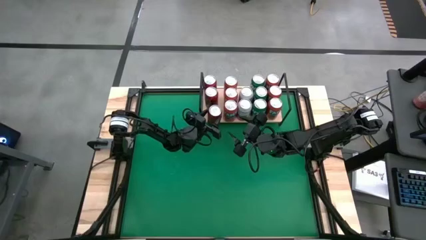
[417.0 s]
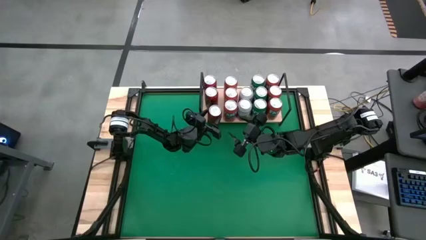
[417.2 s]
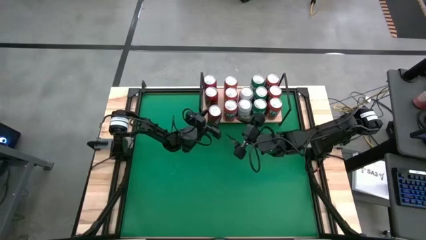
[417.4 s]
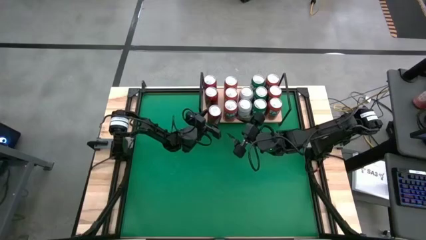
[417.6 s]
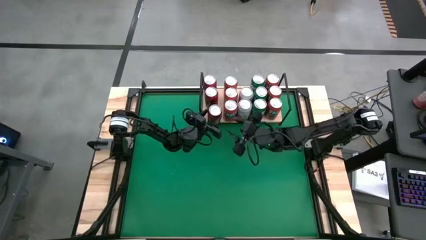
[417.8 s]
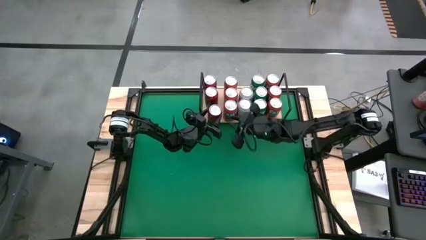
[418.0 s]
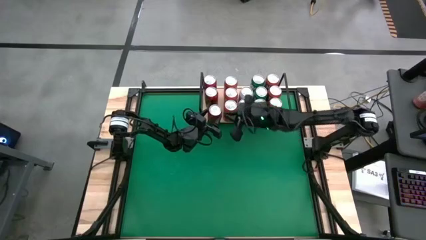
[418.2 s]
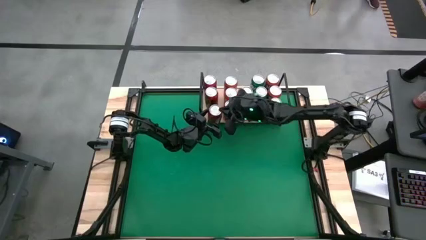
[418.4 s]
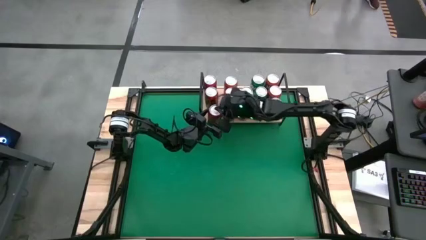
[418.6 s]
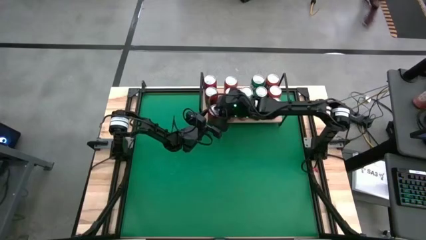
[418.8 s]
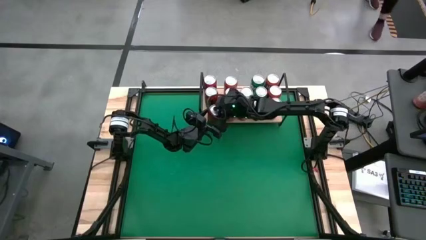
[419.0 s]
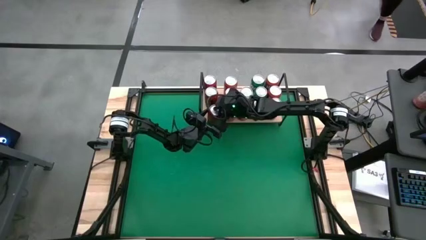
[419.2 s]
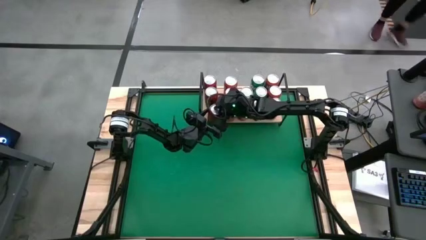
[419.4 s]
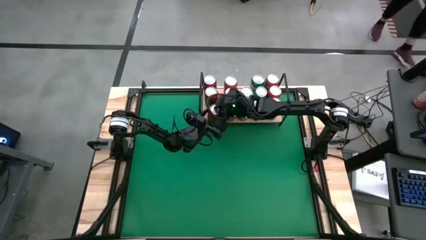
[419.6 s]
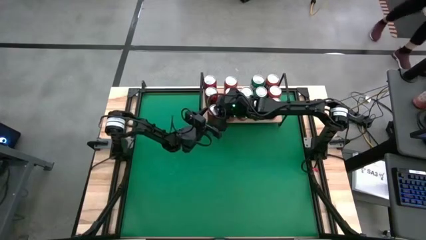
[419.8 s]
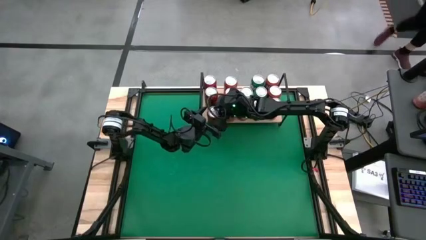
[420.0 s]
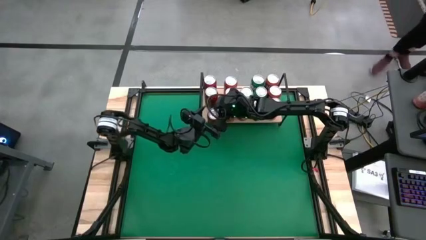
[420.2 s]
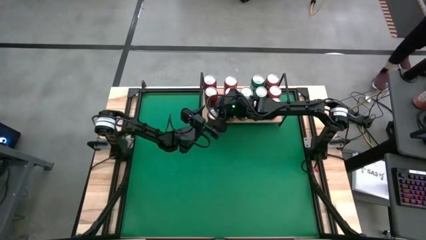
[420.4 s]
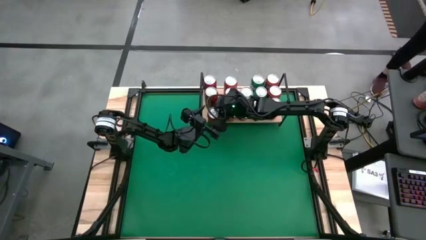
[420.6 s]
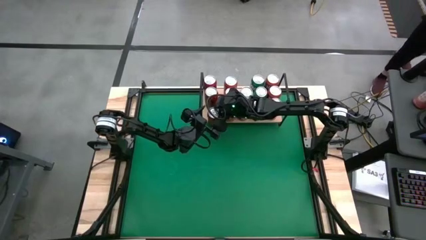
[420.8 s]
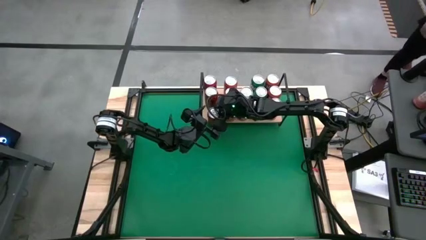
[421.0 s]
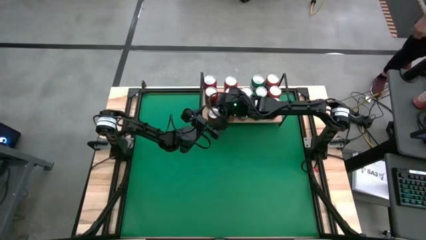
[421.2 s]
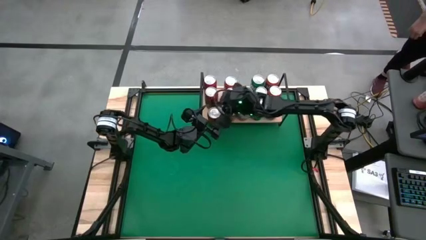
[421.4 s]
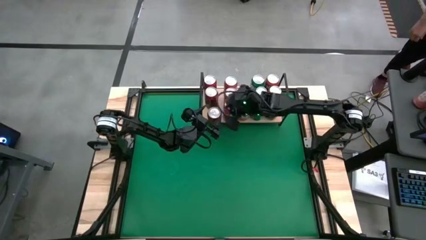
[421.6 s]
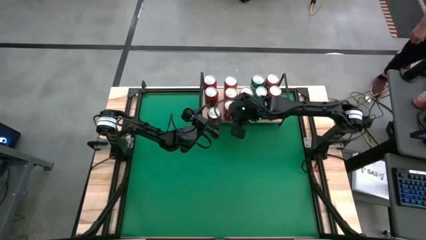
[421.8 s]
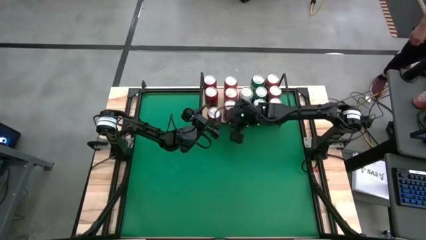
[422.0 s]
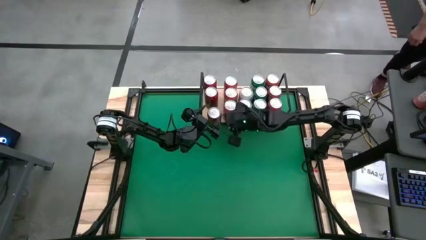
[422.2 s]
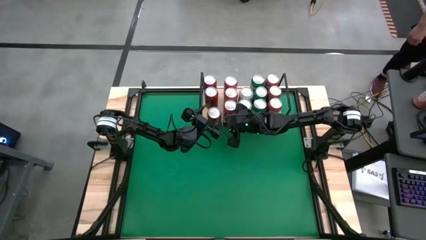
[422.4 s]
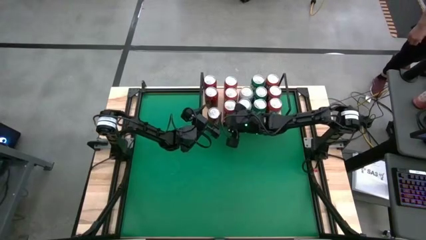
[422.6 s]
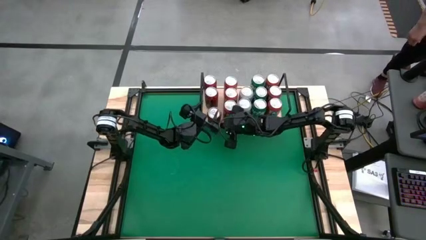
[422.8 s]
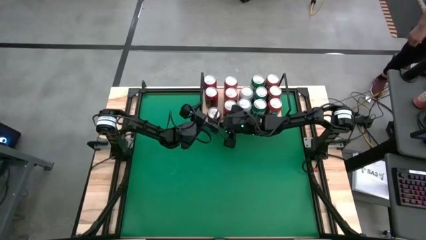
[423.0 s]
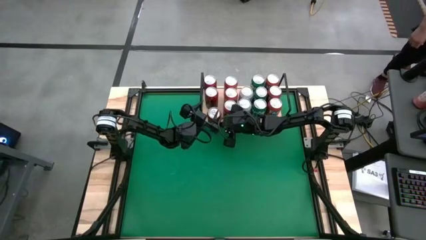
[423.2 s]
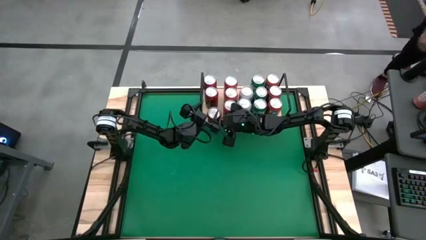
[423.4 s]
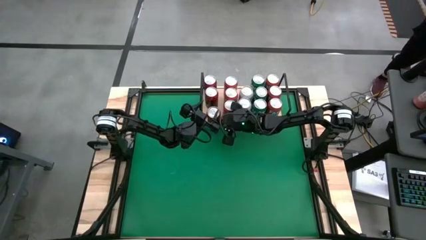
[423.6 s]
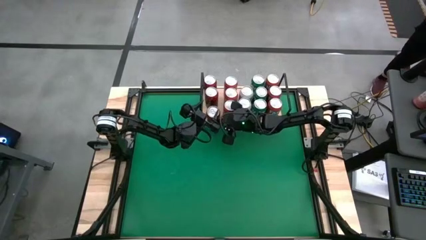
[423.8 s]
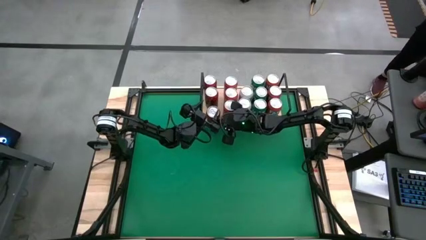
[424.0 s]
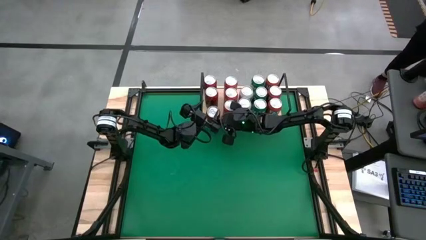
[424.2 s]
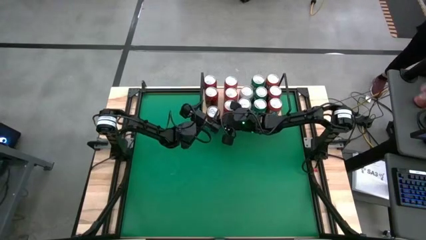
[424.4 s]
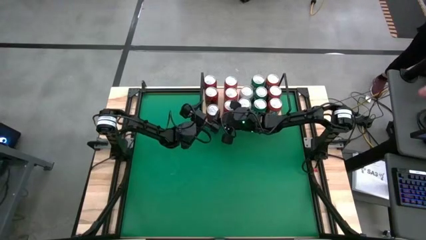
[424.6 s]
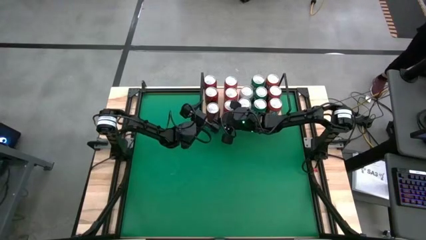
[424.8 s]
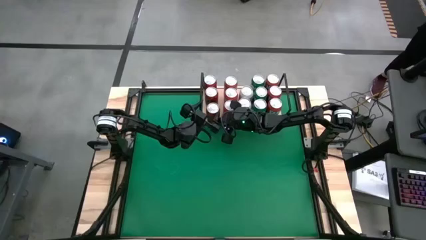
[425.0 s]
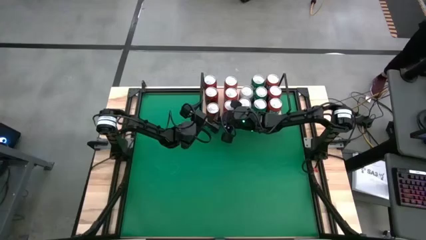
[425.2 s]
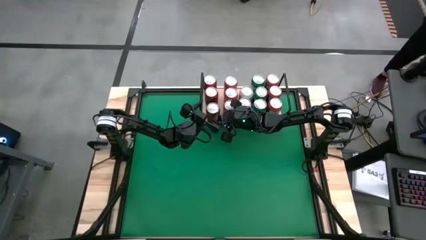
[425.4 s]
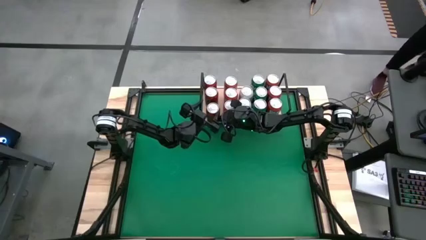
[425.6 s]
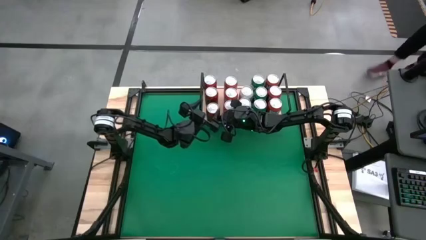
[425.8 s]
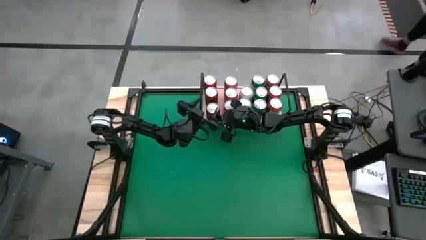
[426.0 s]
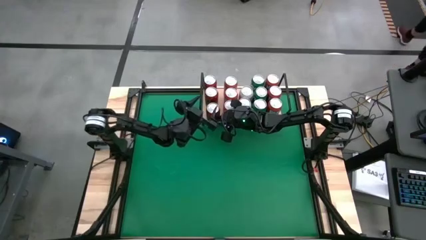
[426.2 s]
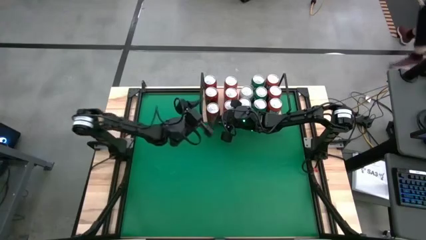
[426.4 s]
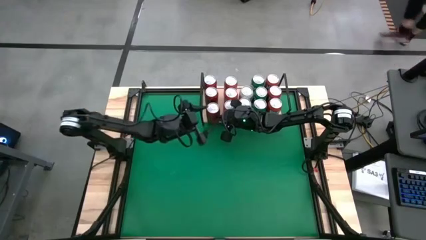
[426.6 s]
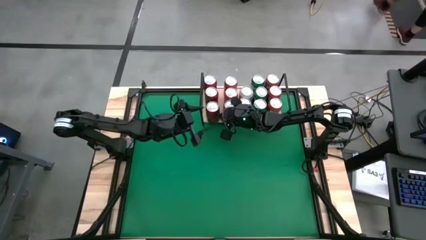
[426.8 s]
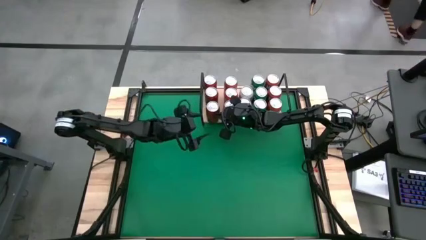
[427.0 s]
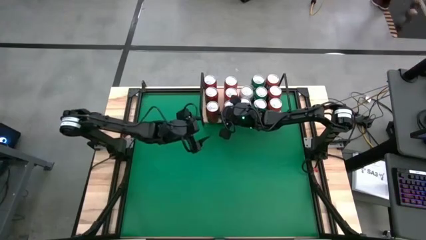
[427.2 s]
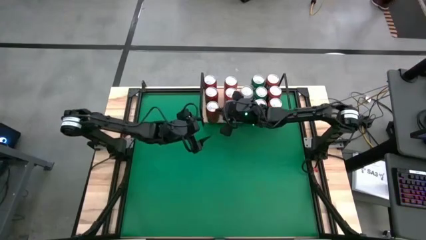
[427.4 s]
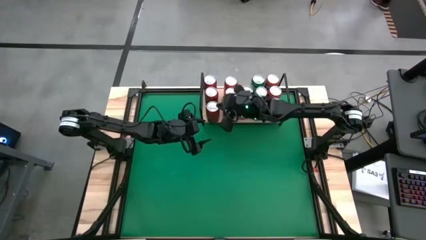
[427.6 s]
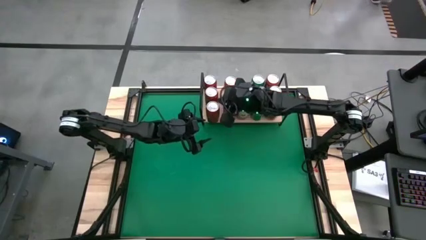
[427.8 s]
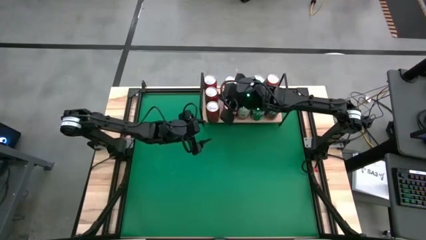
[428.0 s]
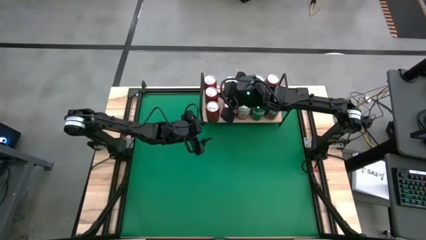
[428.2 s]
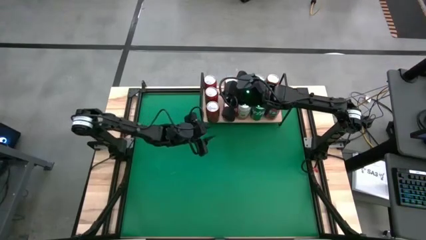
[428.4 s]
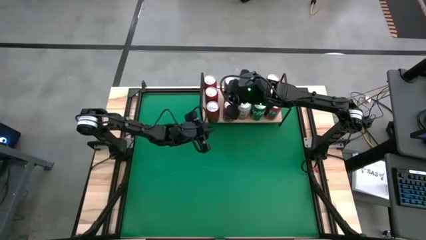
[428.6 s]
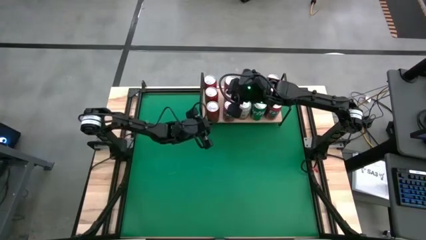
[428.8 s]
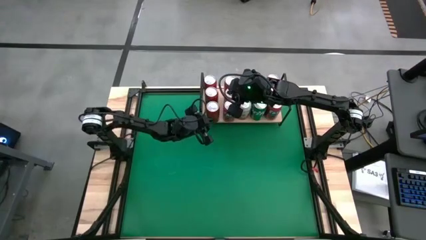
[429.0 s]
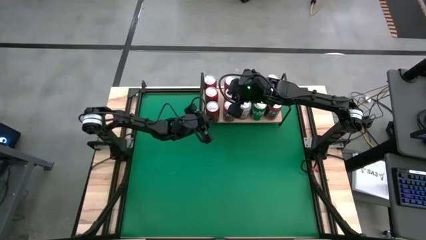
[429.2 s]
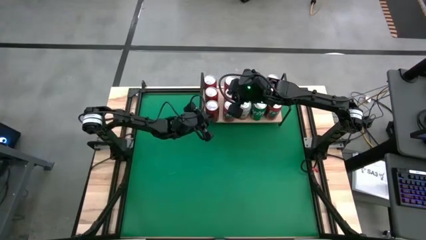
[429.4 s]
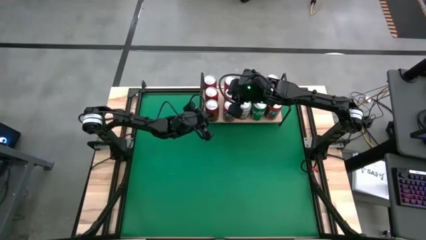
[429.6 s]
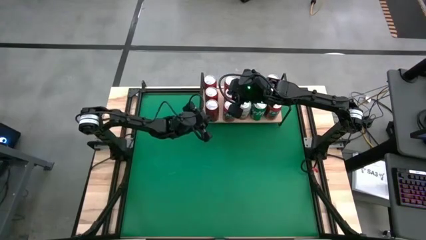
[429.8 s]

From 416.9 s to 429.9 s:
Task: Place canned beverage on shelf
Put the red-black soda can on the shelf aligned with the other red-black soda can
